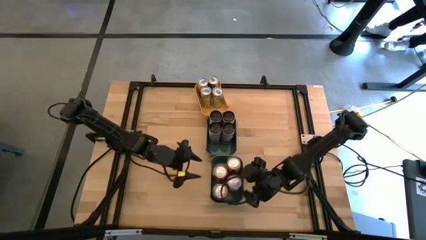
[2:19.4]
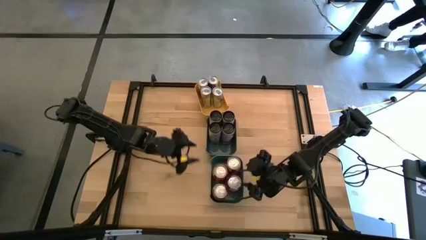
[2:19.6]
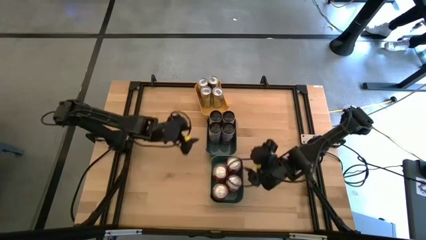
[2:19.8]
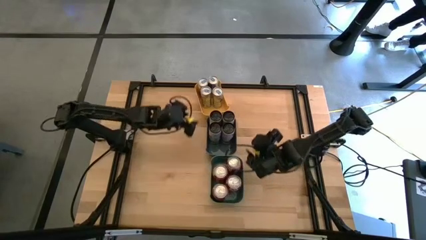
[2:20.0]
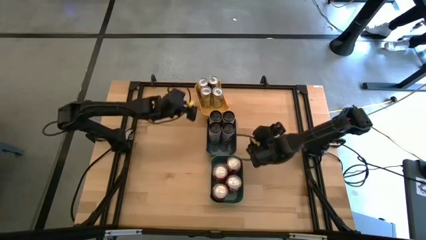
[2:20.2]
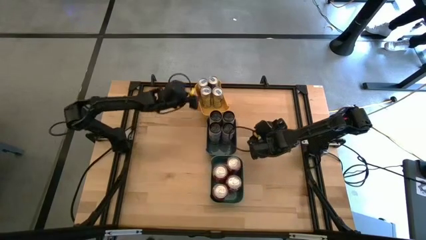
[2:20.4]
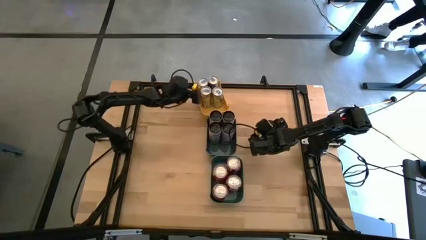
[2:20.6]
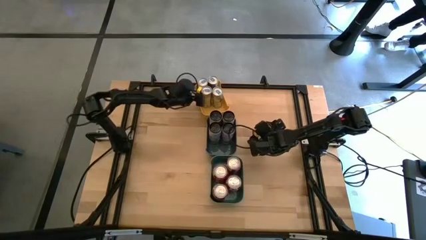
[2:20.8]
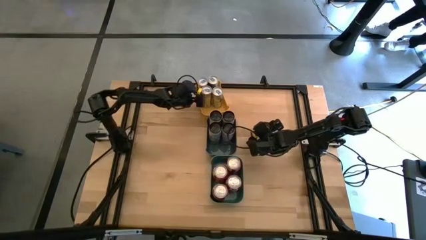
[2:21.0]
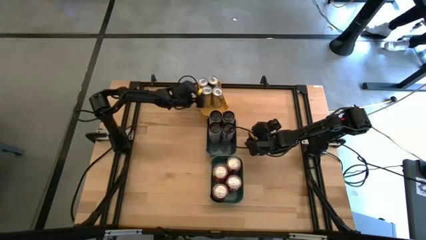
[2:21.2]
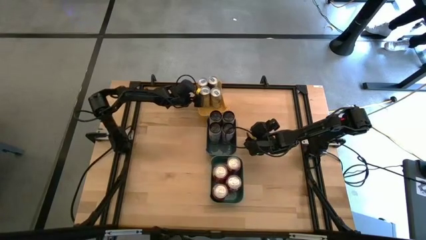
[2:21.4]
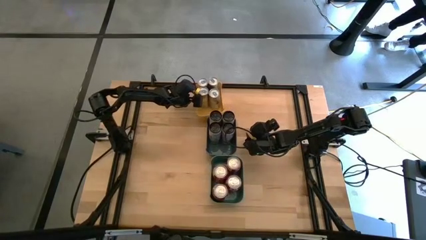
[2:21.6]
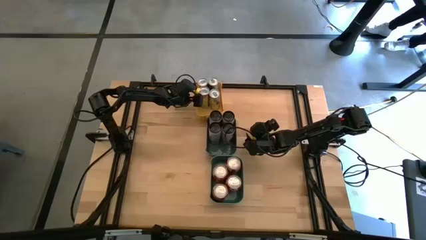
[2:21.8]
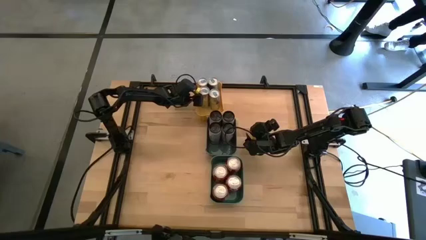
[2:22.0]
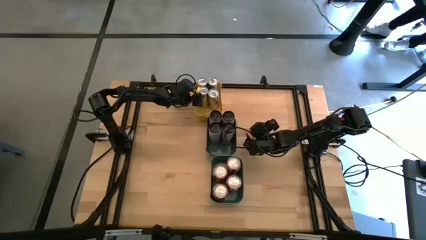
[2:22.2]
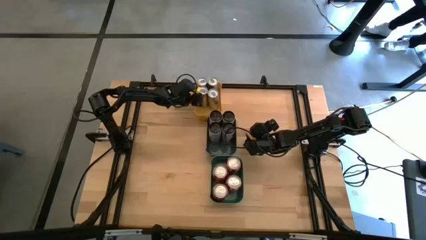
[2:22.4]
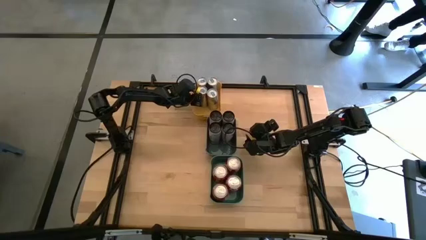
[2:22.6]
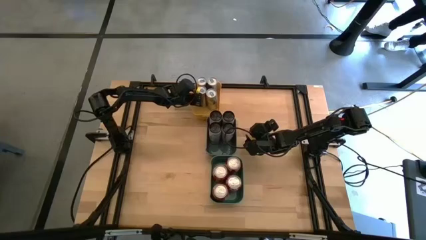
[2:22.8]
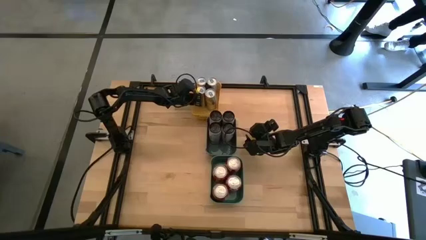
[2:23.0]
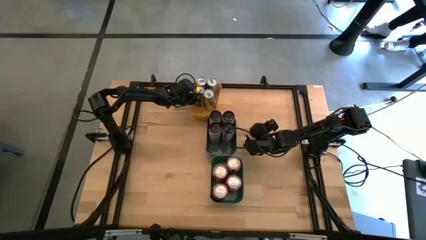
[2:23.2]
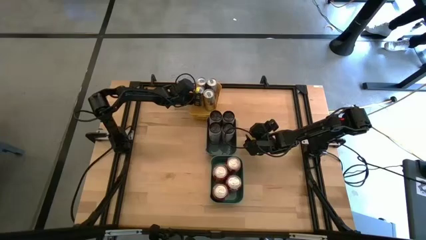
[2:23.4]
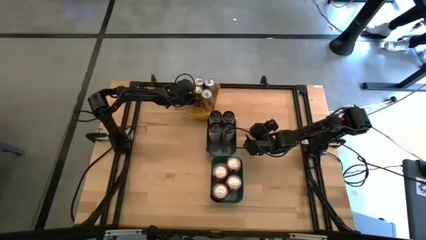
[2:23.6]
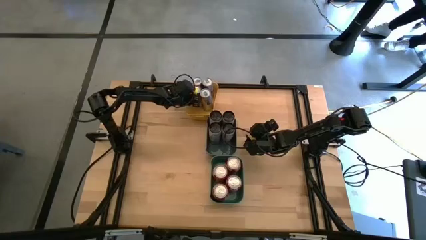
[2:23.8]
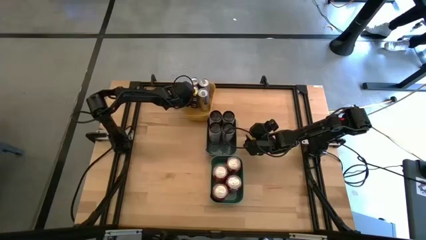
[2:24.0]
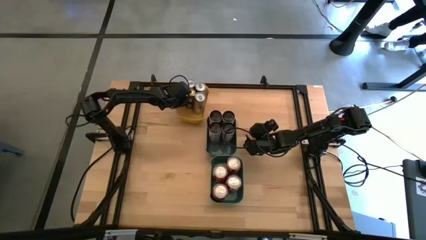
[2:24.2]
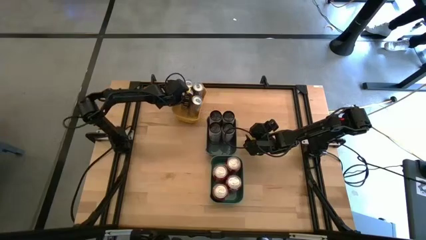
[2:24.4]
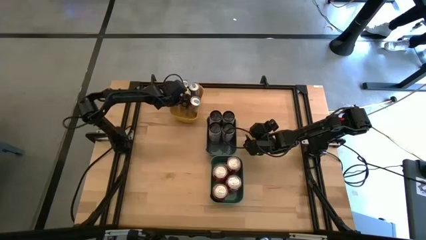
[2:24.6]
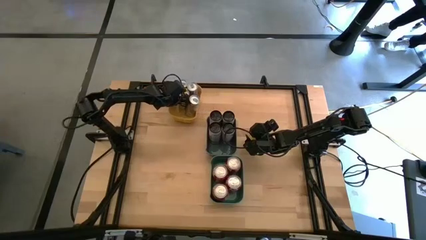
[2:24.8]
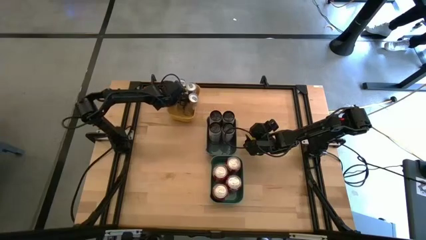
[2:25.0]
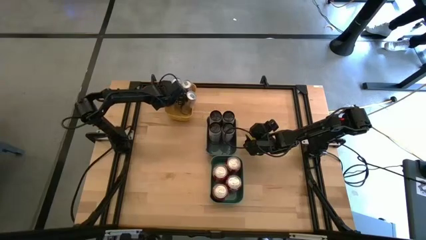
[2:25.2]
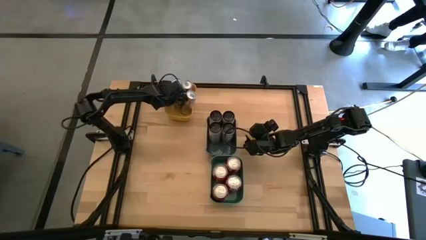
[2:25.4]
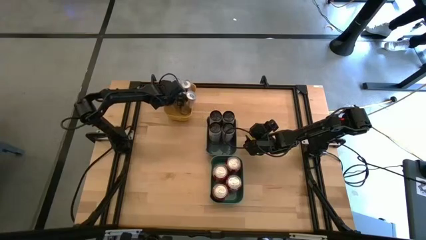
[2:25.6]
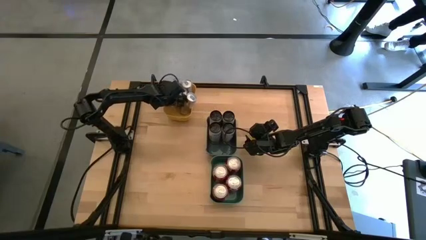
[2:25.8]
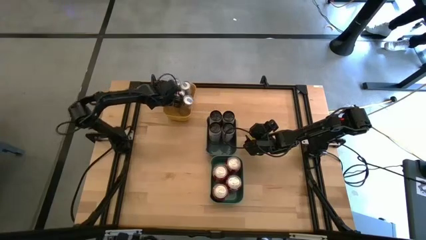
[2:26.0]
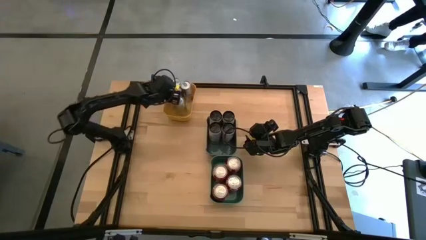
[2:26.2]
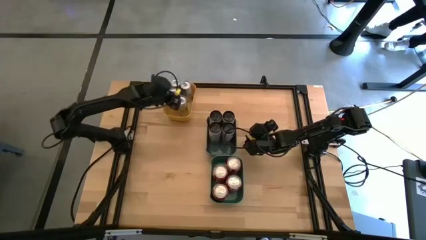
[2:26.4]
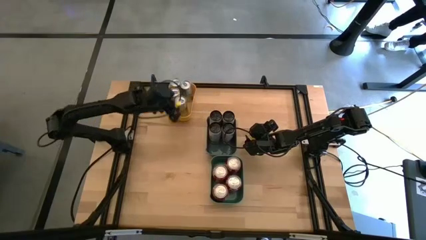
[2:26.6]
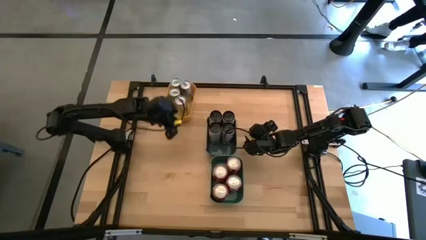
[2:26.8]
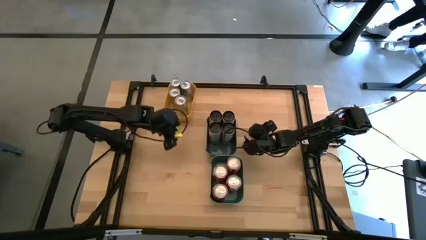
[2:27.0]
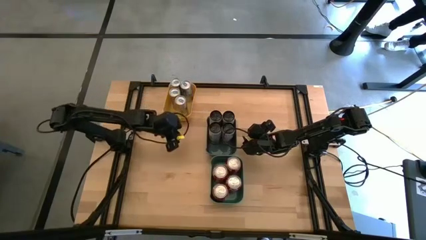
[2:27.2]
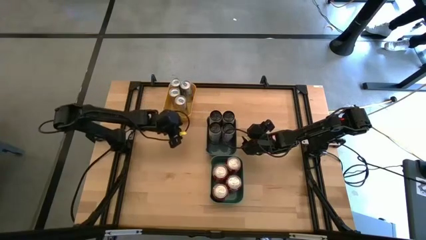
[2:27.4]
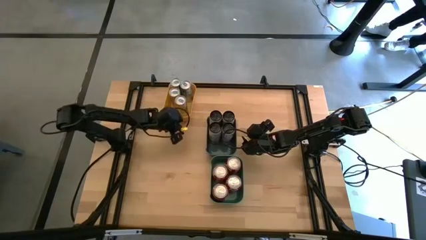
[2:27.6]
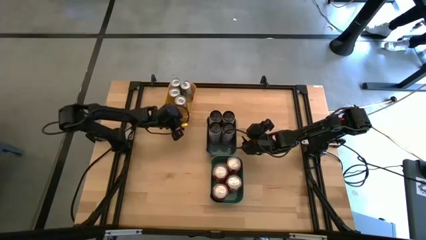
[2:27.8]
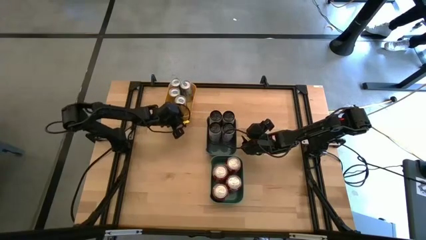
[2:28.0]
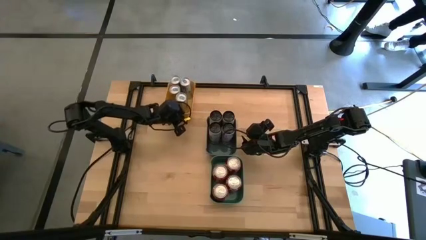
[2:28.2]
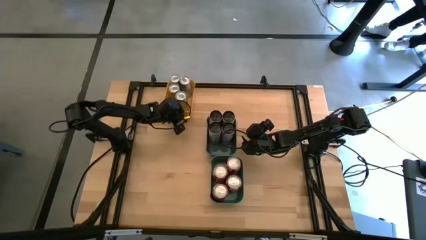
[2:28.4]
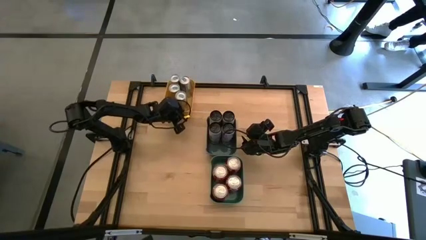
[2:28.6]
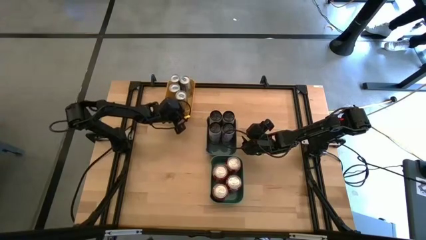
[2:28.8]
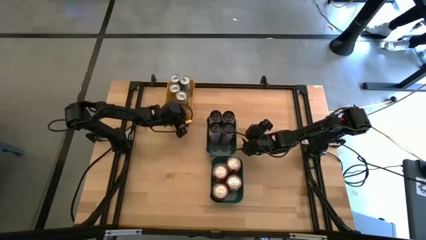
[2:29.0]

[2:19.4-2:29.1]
Task: Sort soda cans
Move the yellow bin to the top left

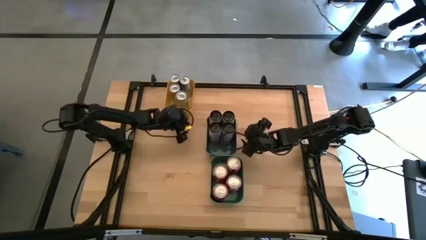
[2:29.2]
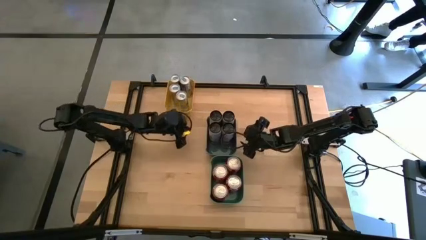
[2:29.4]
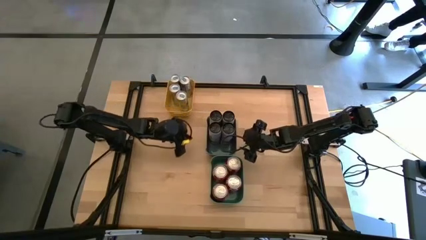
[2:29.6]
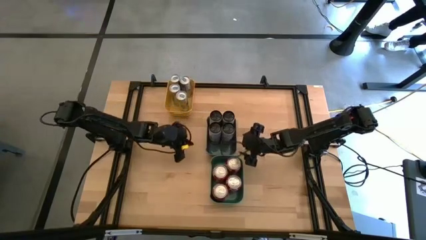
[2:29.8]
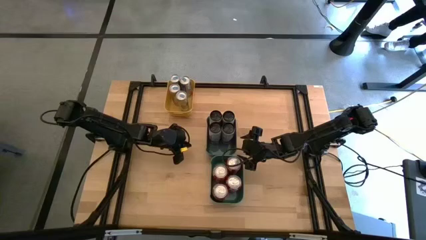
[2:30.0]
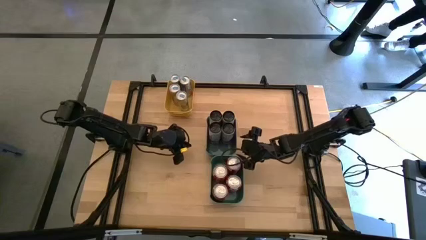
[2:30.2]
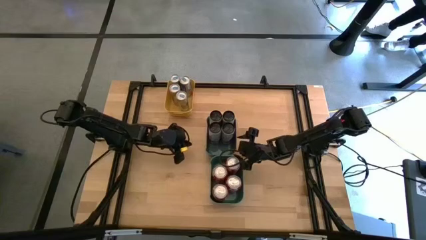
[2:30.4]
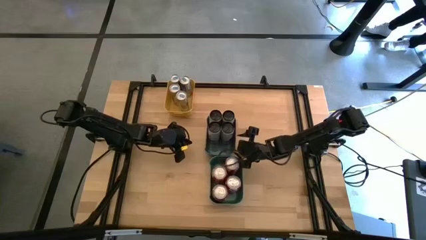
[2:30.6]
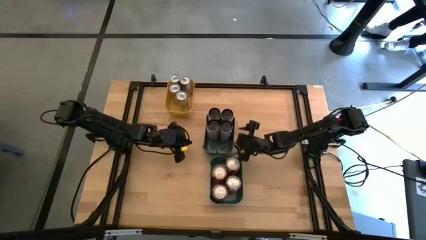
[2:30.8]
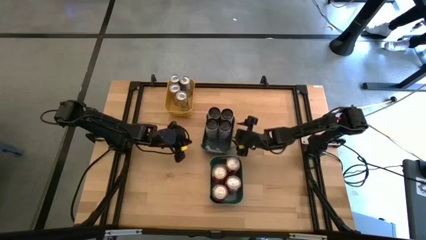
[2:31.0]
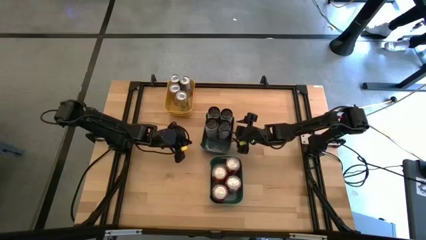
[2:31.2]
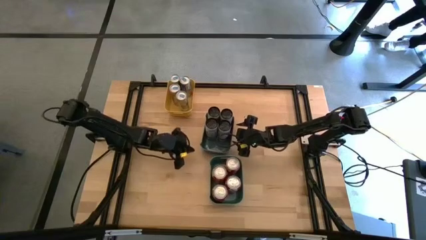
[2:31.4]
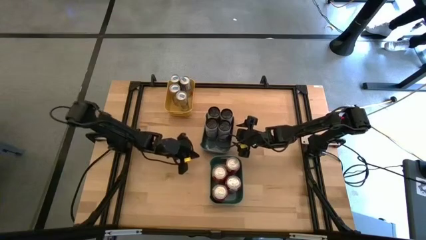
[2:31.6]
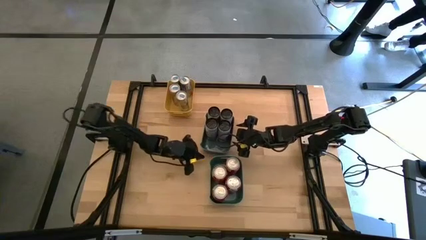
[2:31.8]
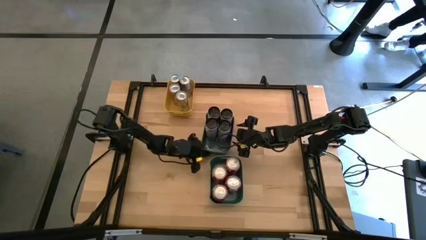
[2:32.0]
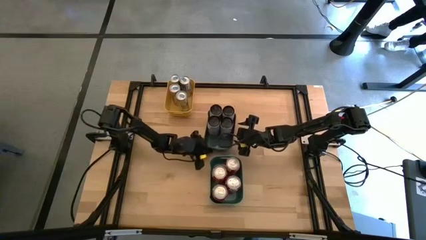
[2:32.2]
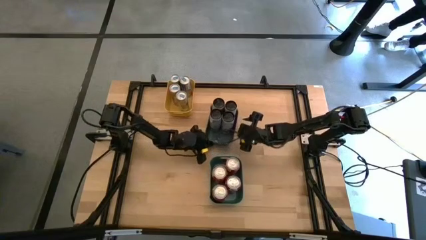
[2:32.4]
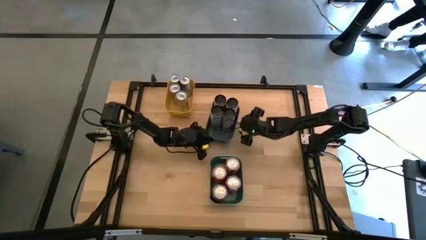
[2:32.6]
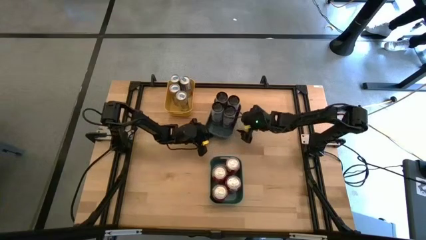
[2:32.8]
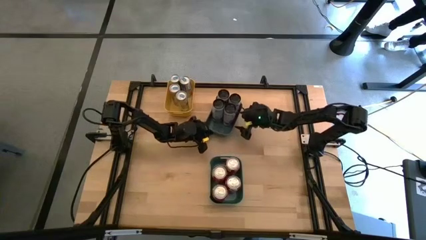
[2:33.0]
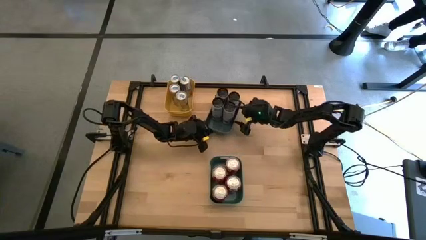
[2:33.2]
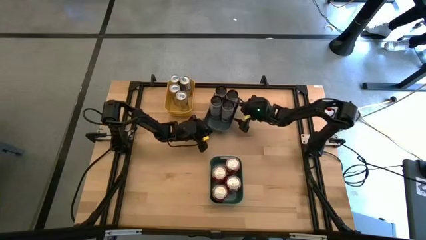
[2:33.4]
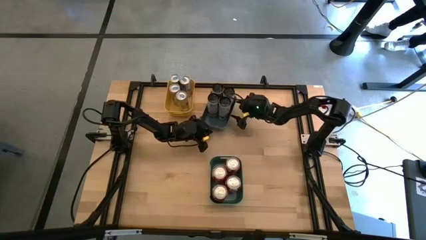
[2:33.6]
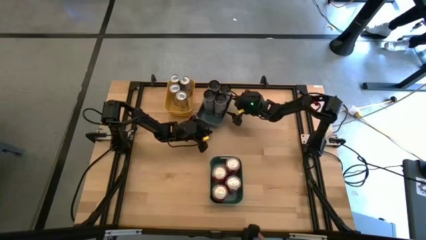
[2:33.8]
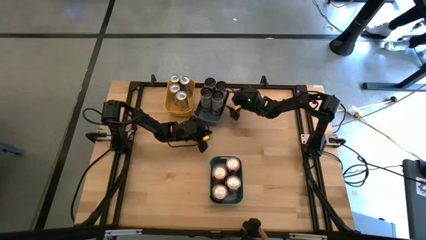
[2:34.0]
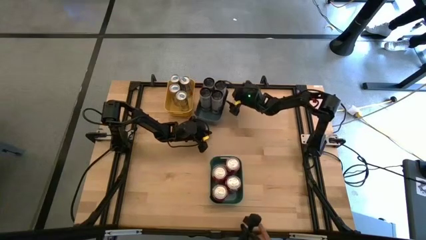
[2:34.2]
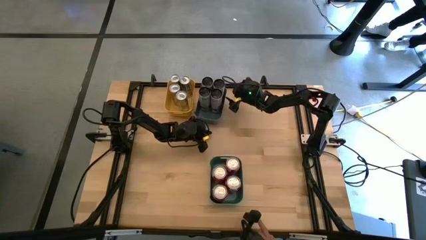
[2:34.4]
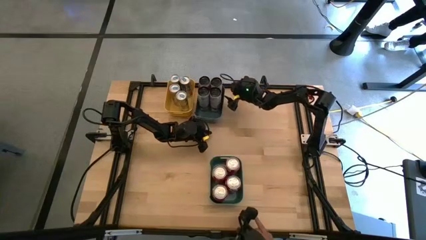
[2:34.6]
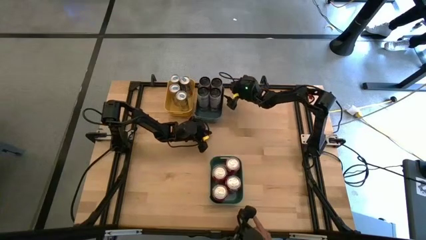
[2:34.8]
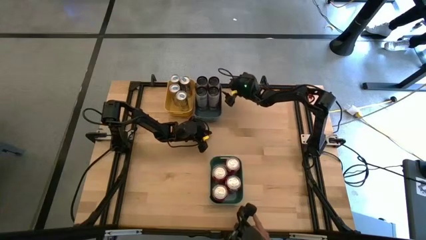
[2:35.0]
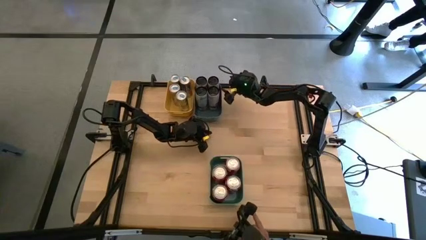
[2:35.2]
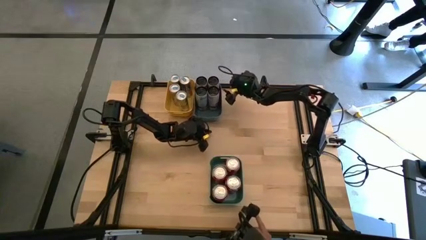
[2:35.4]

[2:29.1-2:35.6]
Move the dark green bin to the top beside the yellow bin
